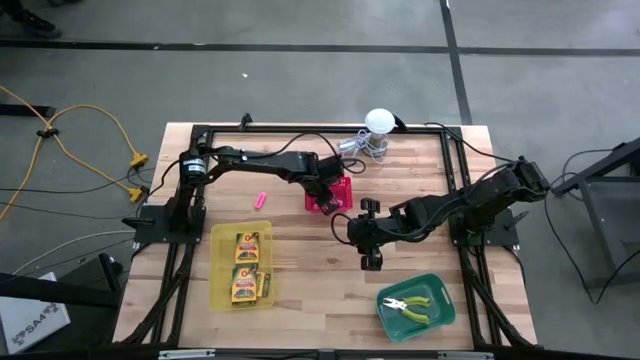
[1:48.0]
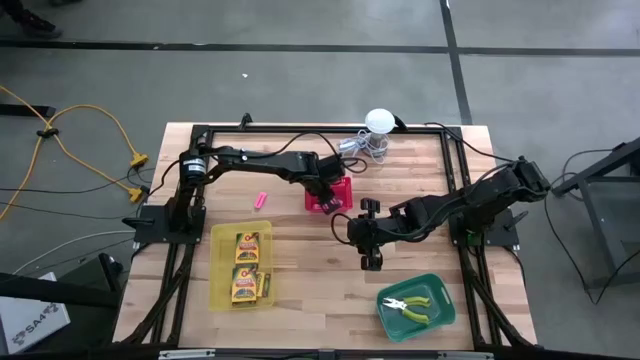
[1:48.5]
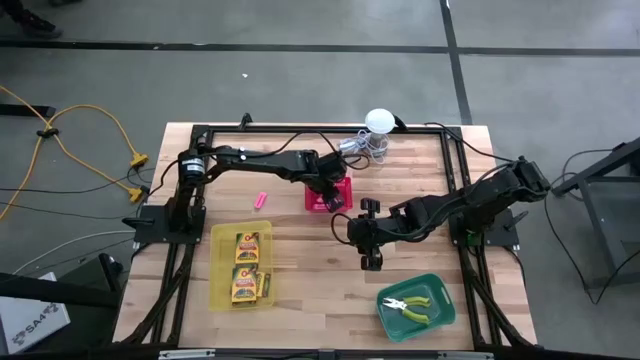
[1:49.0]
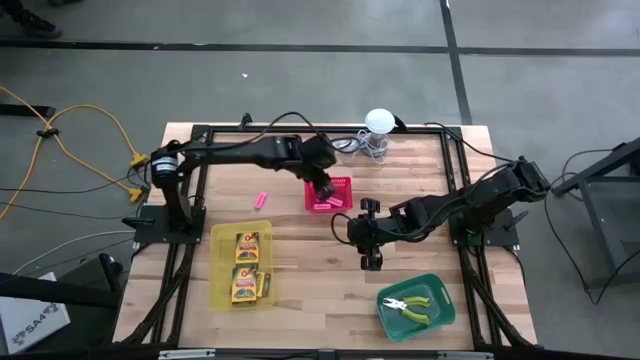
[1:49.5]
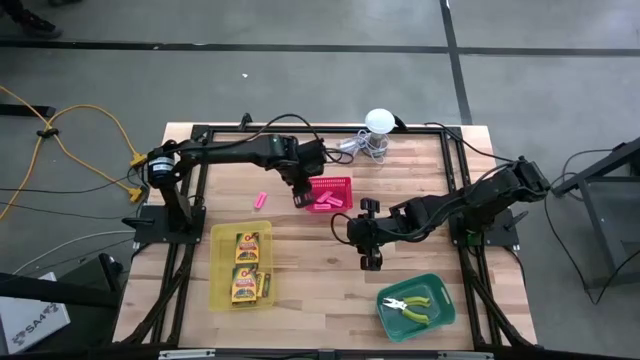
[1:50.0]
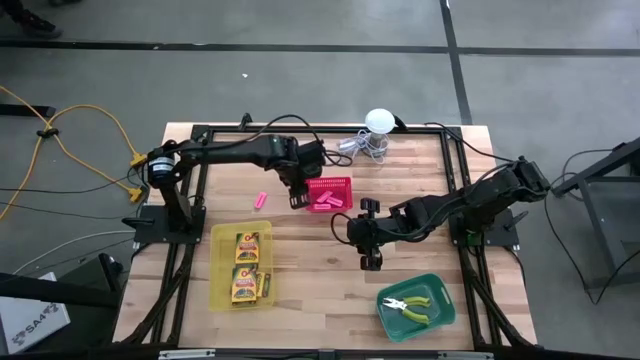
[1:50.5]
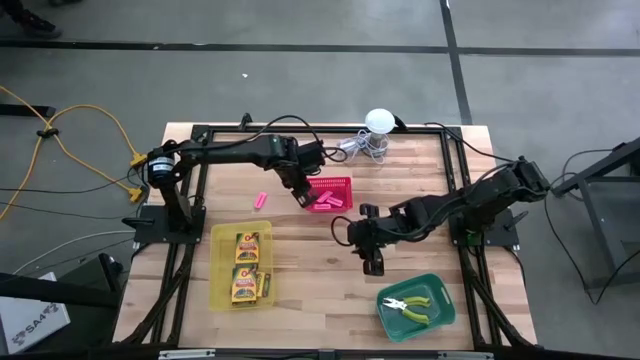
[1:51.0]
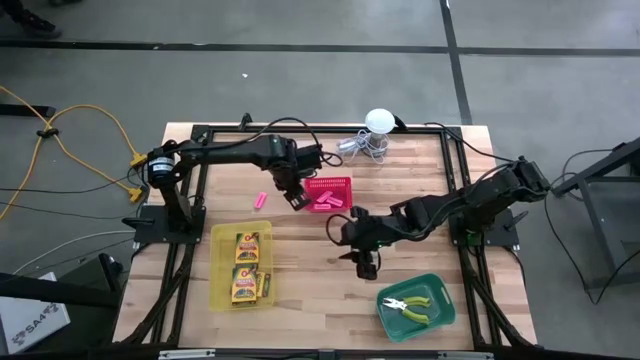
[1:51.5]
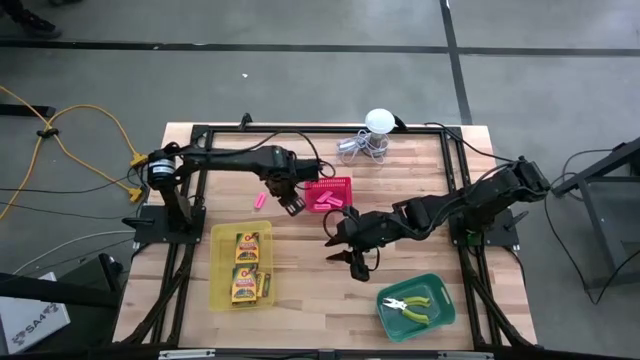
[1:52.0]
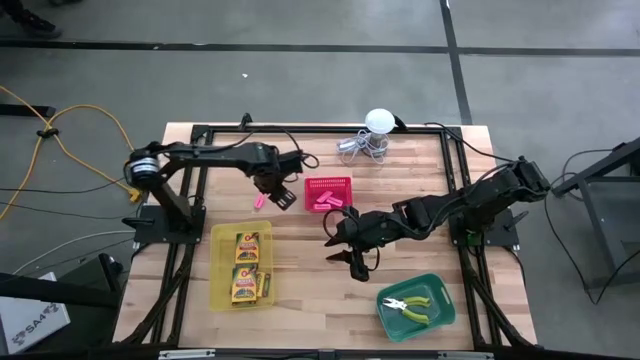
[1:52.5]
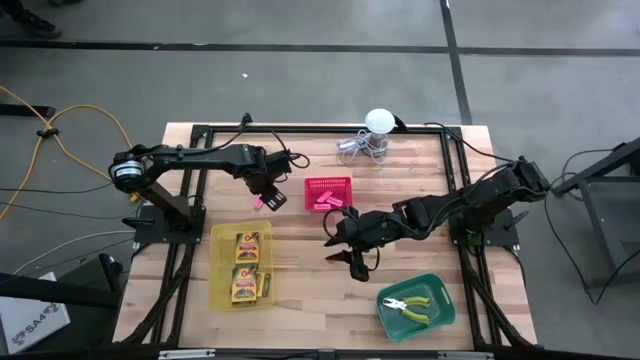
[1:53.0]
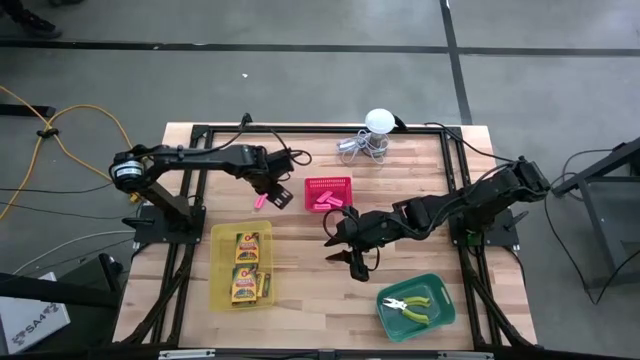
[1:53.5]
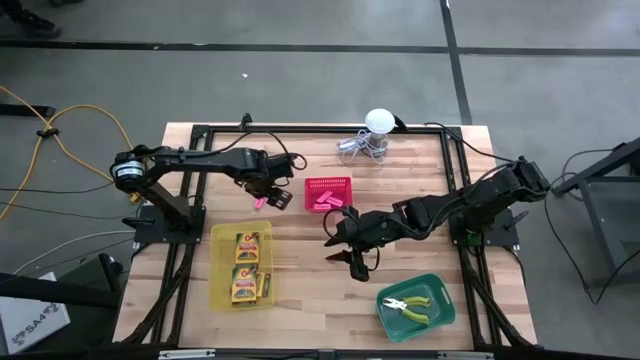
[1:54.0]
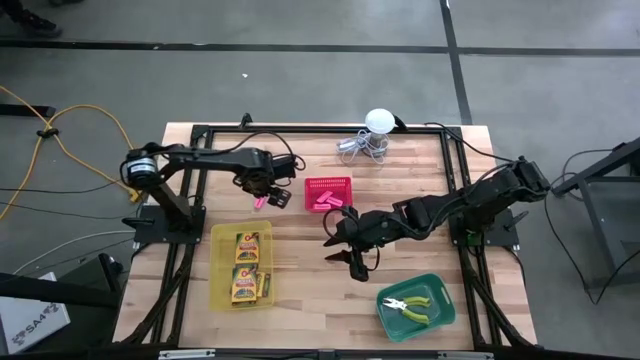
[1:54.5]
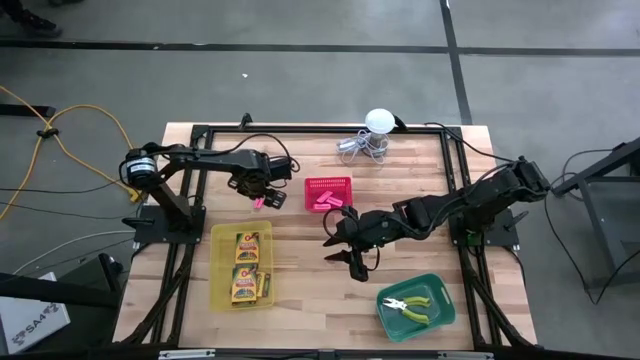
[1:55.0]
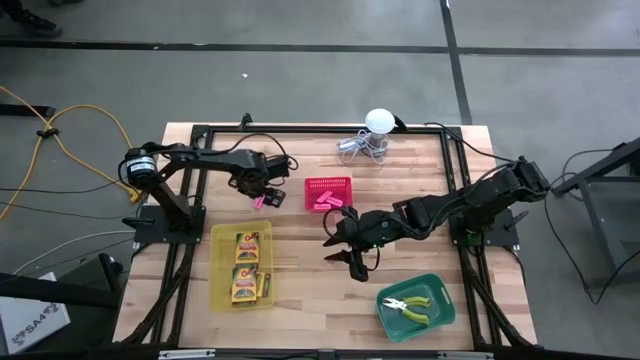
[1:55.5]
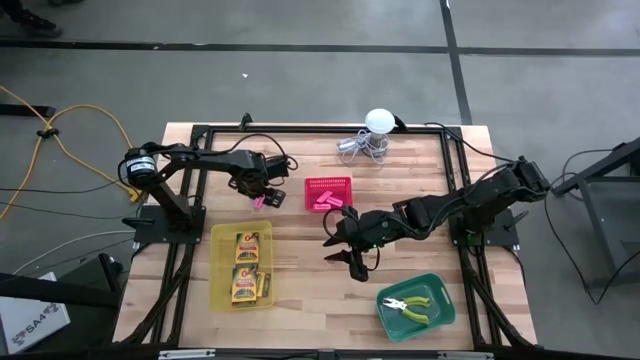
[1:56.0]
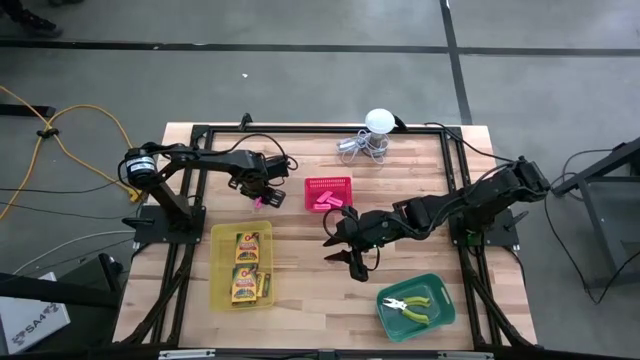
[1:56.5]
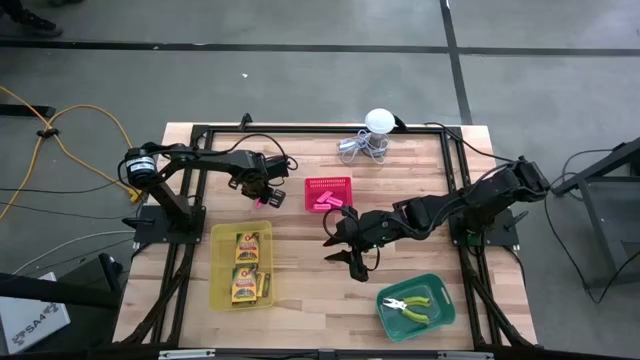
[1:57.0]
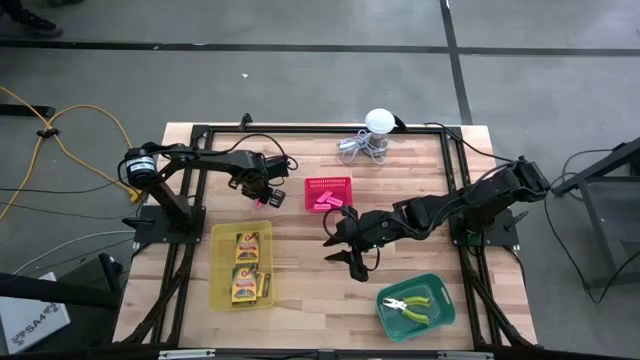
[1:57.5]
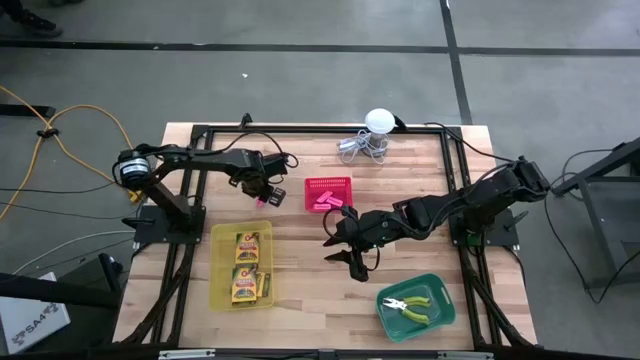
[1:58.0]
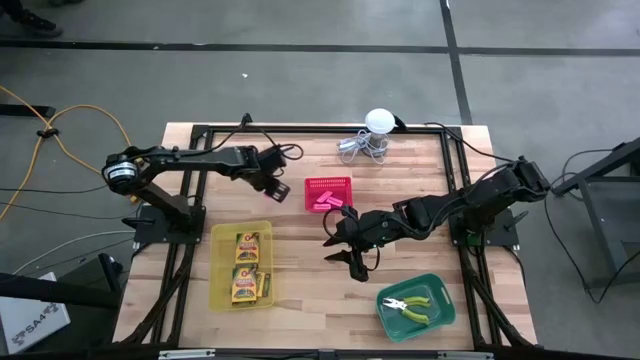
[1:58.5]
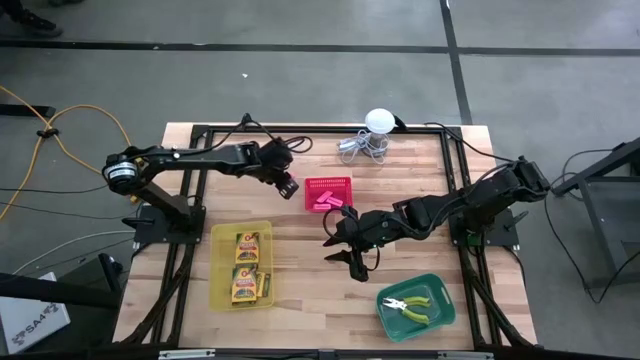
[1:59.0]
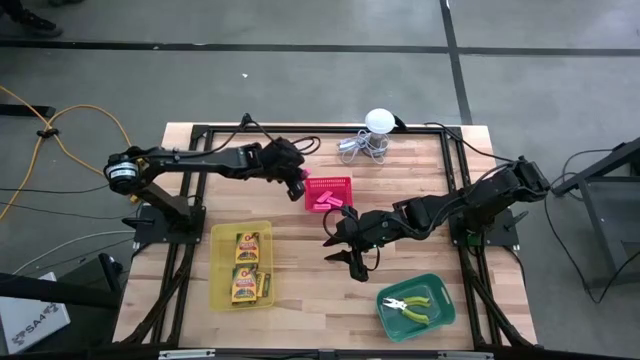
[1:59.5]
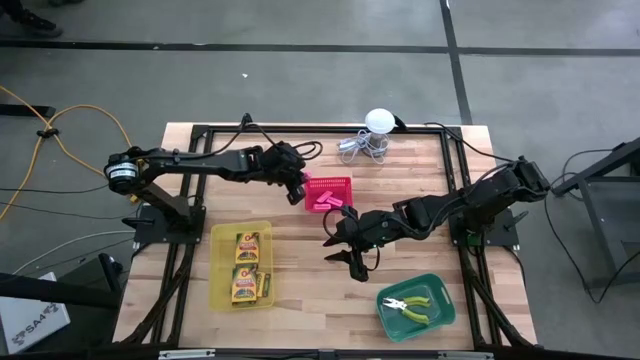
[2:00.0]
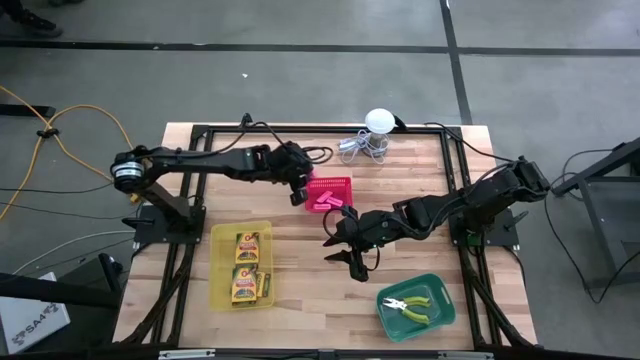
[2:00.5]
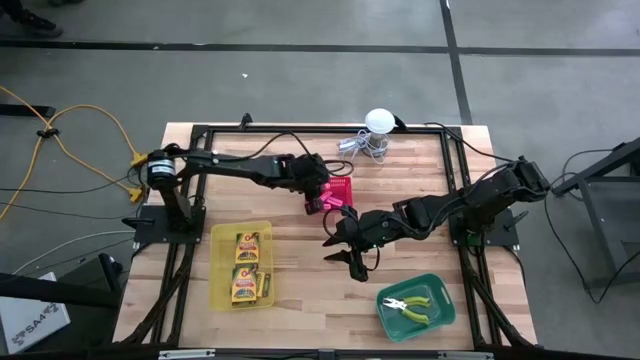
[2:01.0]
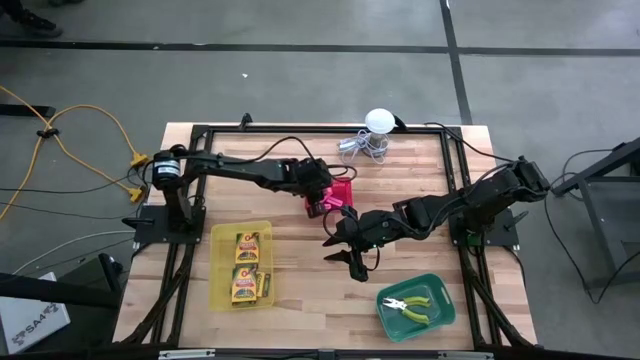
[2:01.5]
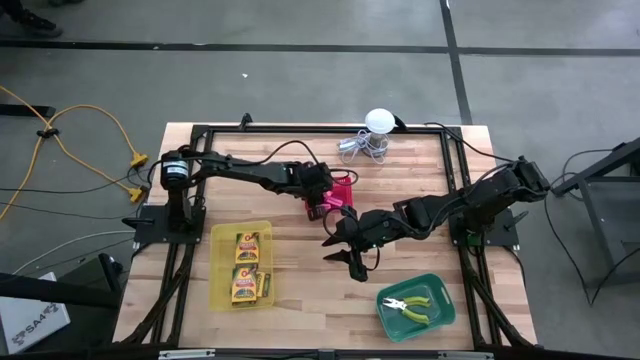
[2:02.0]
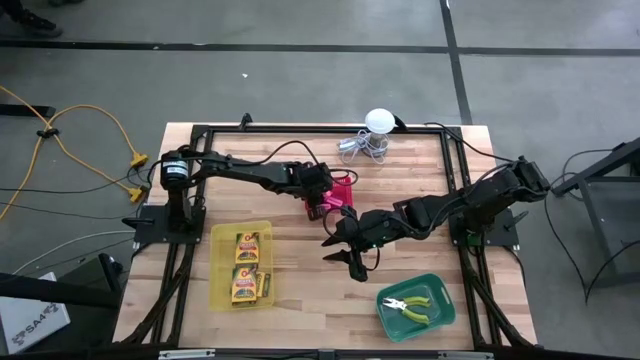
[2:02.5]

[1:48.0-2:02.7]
Task: Pick & Place School Supplies
Put the pink eraser into the red bin

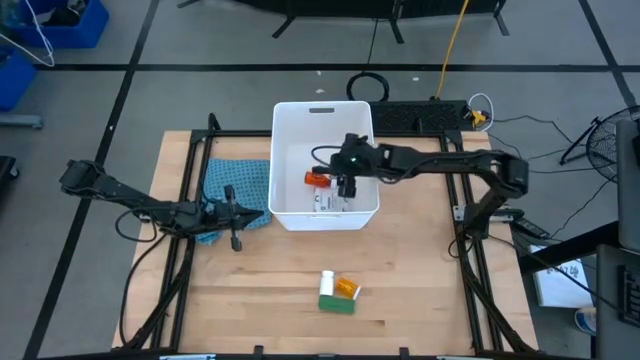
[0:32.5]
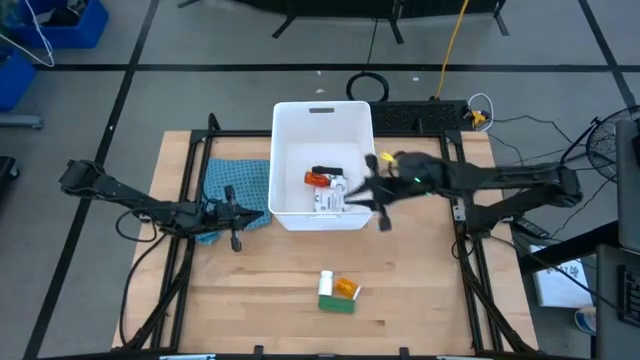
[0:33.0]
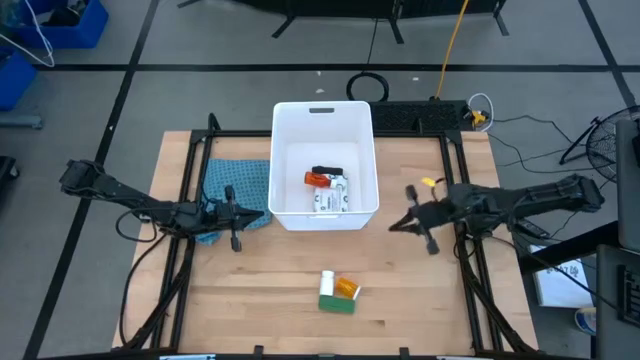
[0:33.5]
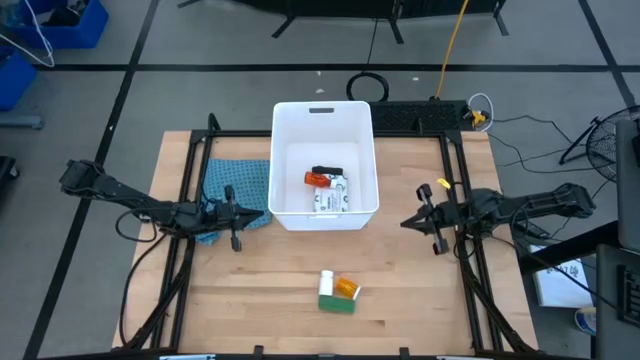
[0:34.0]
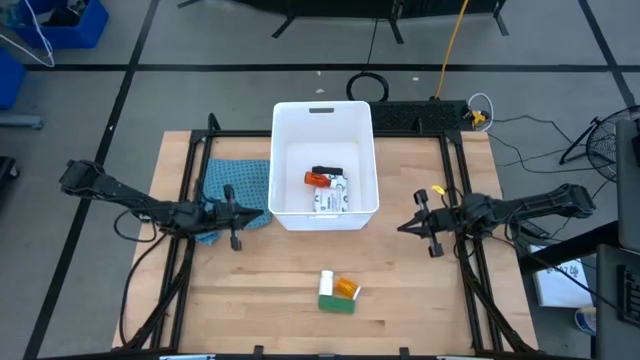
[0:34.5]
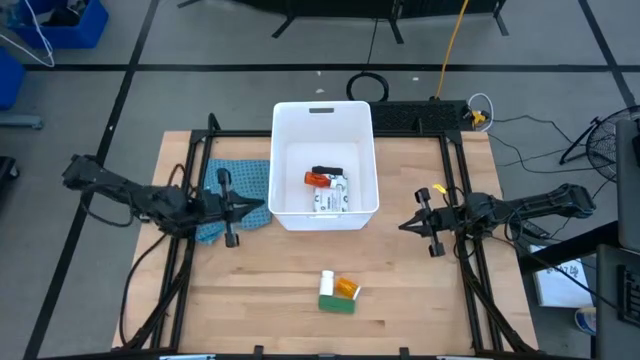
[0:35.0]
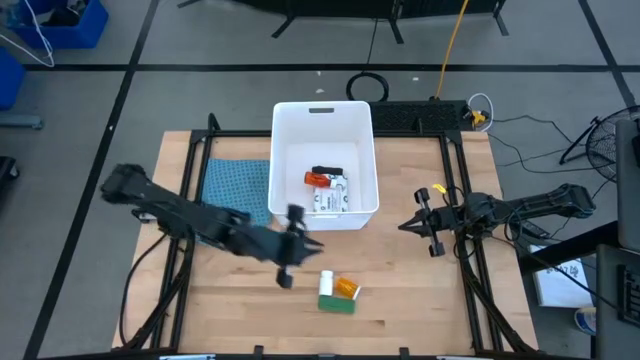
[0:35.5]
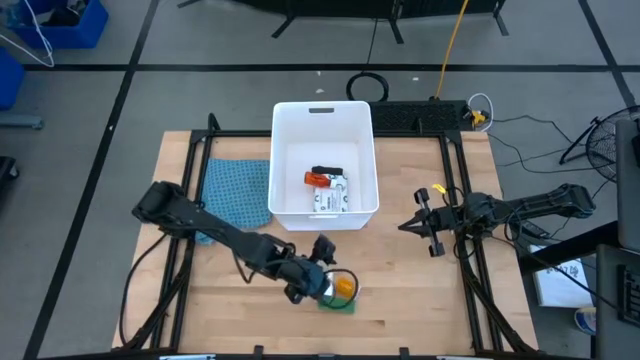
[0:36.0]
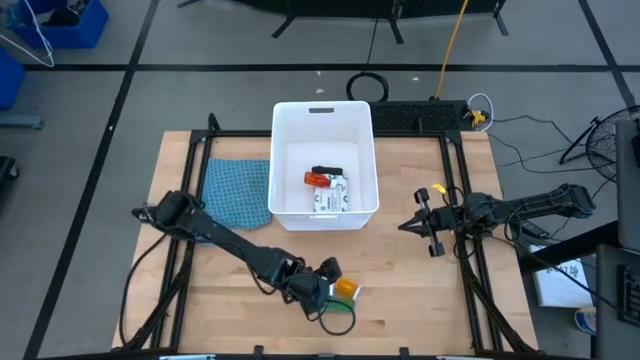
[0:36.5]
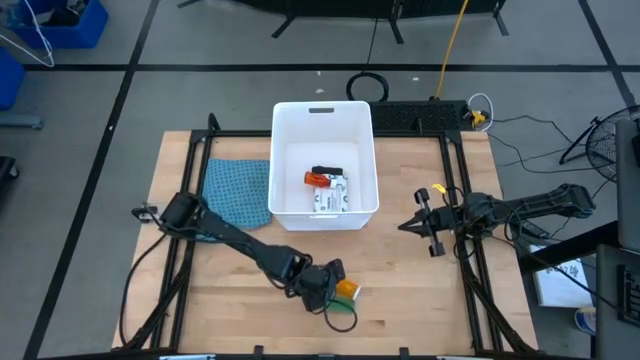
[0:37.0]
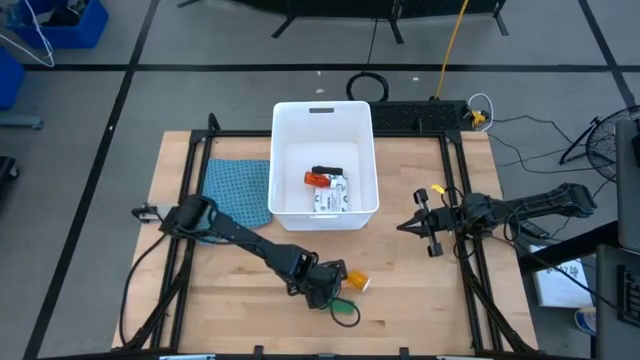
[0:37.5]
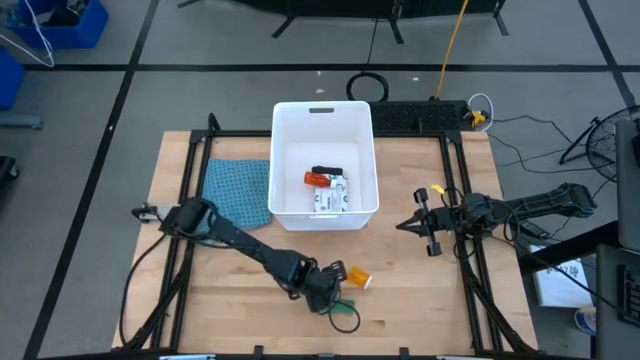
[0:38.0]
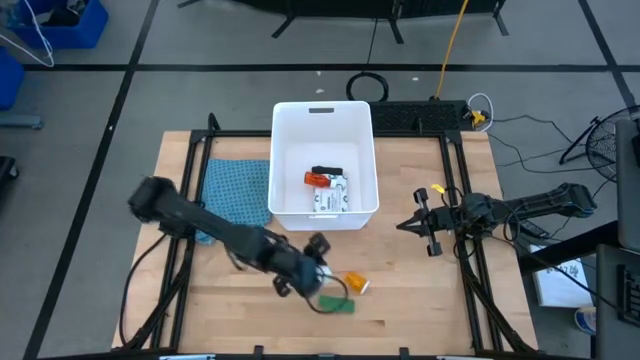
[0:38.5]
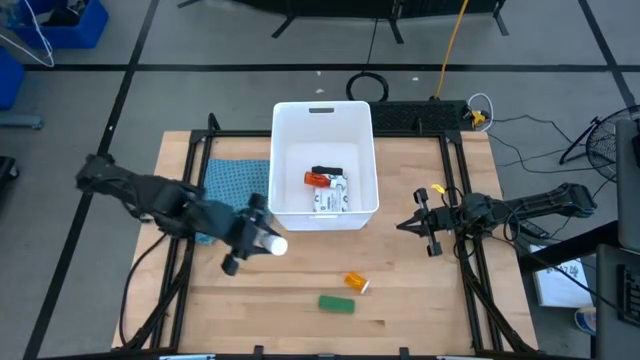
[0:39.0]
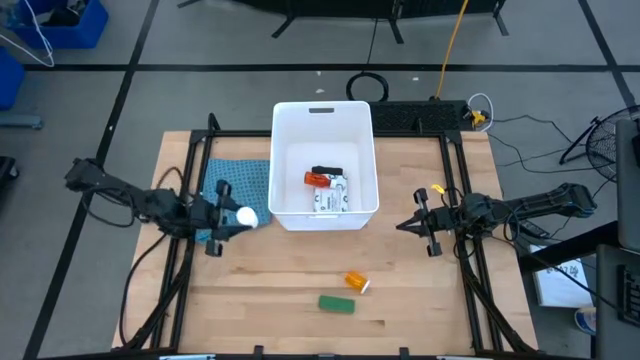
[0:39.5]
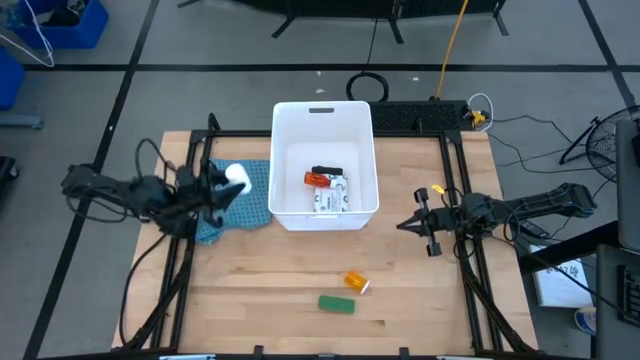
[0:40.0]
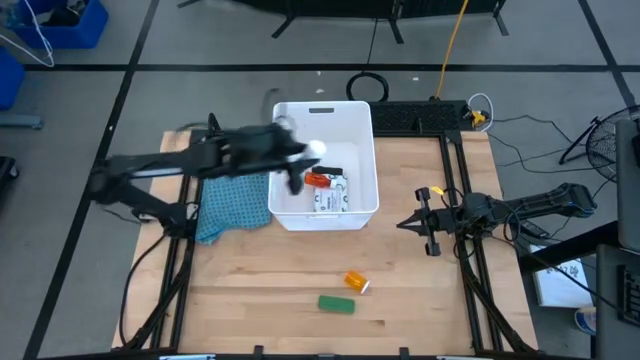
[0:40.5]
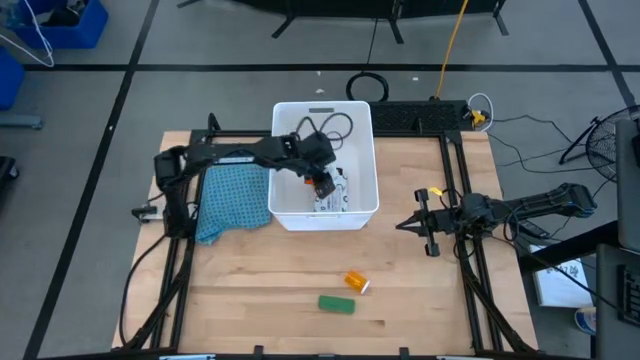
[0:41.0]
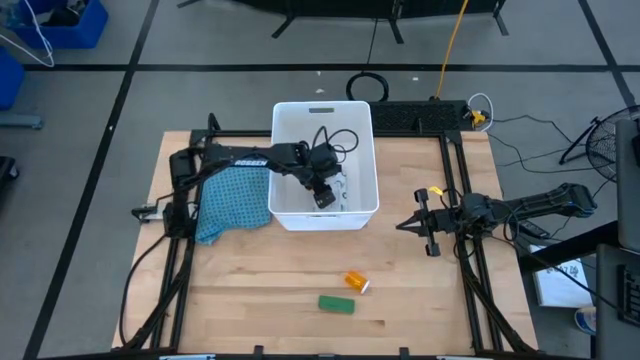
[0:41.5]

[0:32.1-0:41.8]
Task: Pick & place medical supplies in basket/bin
Put the white medicine bottle into the white container
